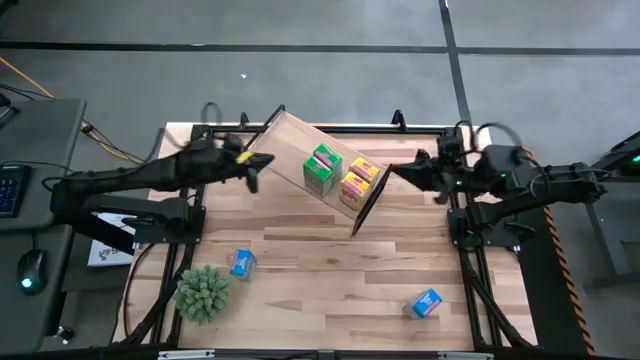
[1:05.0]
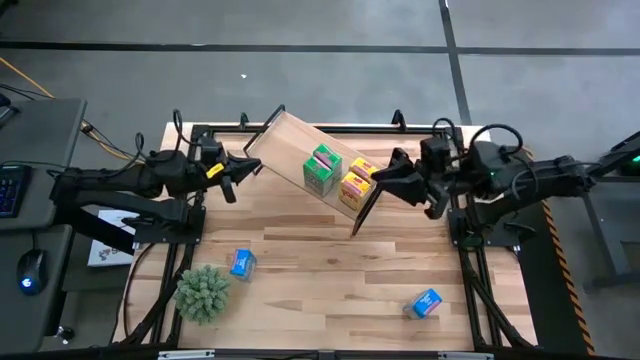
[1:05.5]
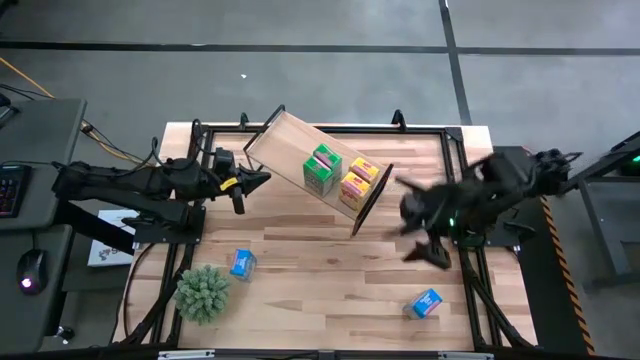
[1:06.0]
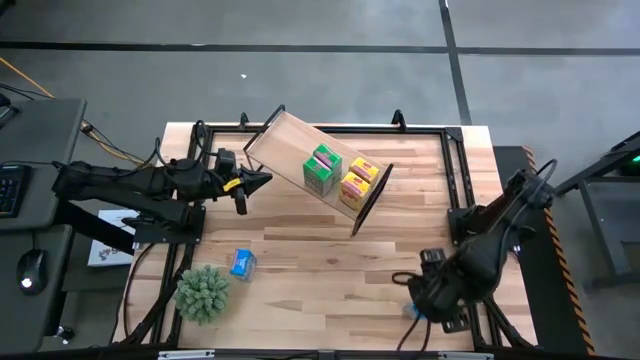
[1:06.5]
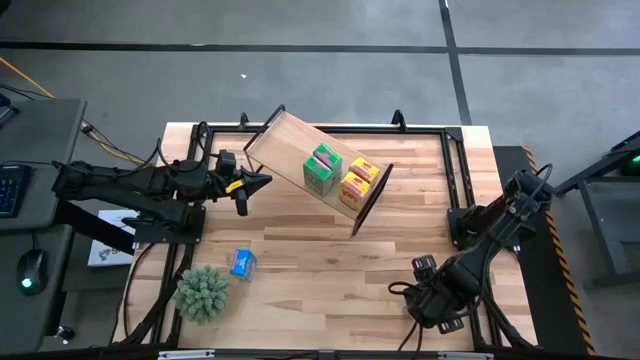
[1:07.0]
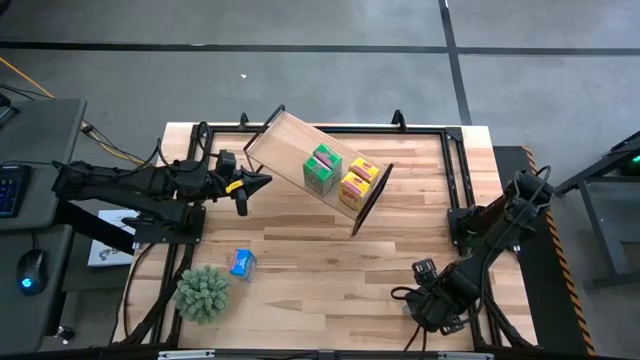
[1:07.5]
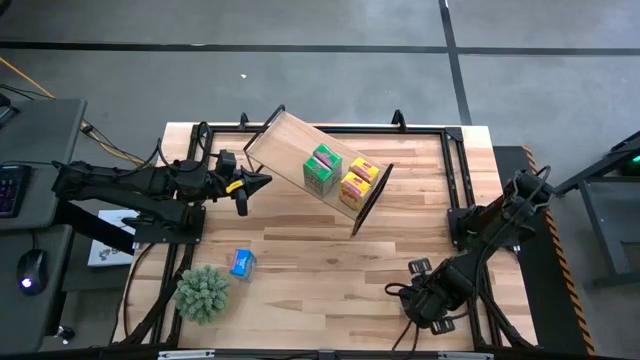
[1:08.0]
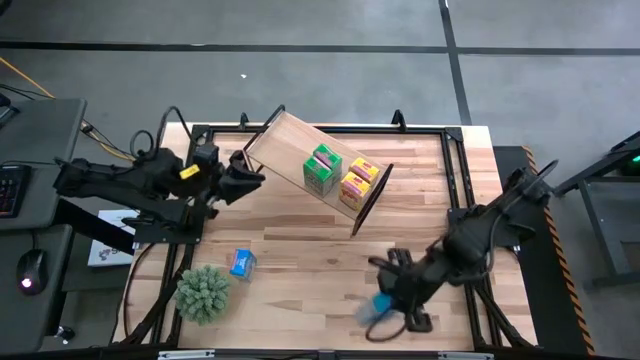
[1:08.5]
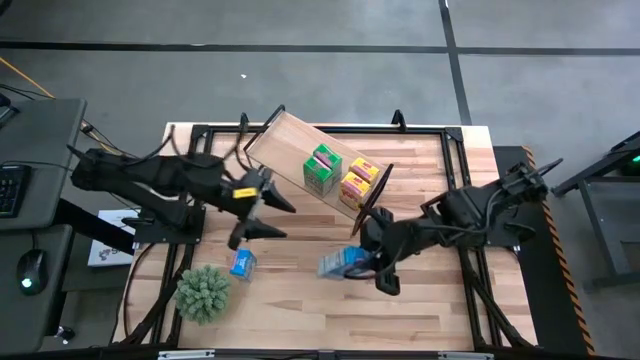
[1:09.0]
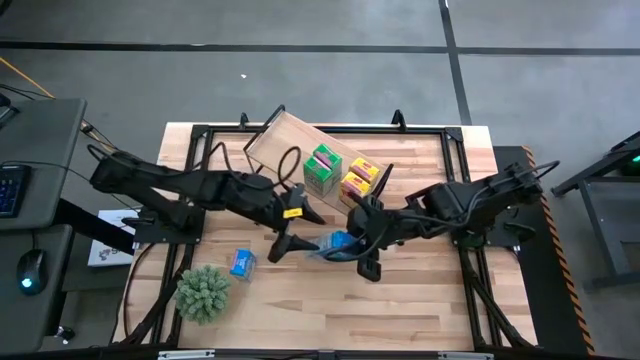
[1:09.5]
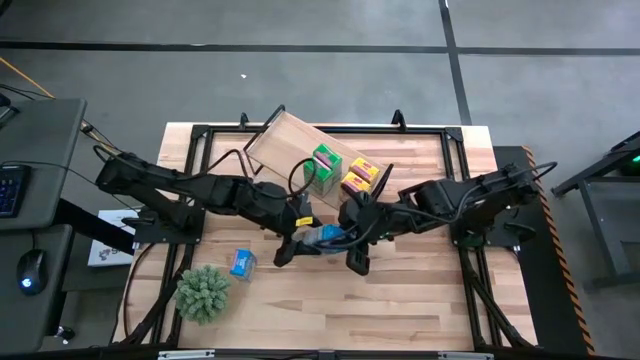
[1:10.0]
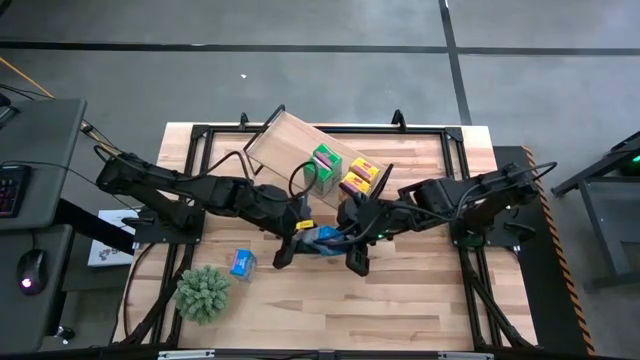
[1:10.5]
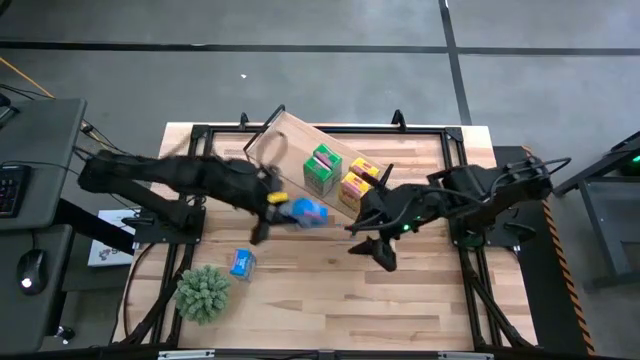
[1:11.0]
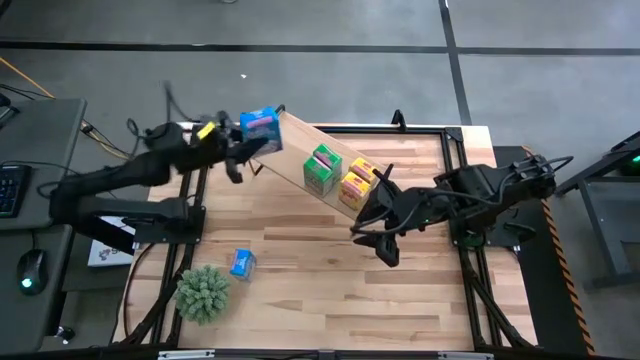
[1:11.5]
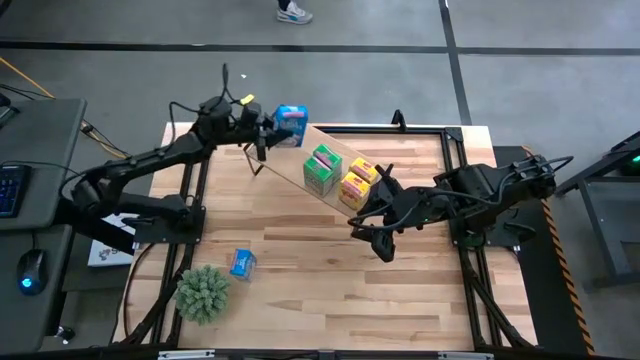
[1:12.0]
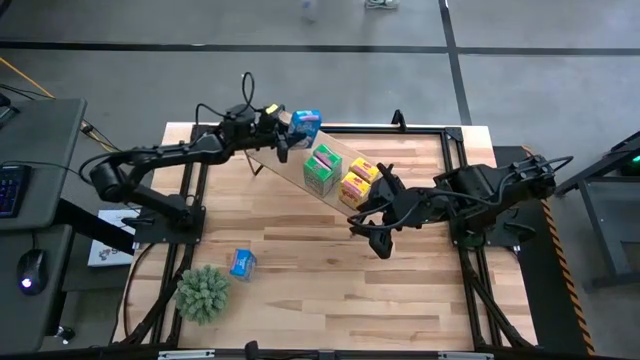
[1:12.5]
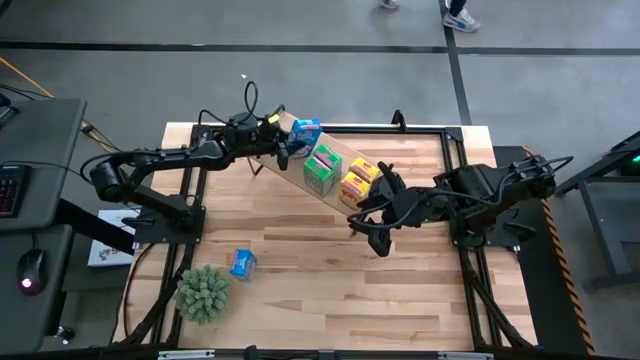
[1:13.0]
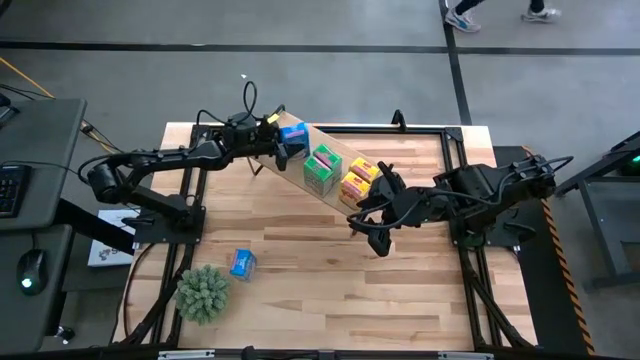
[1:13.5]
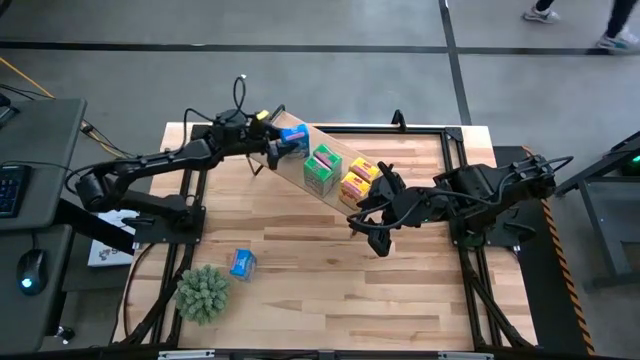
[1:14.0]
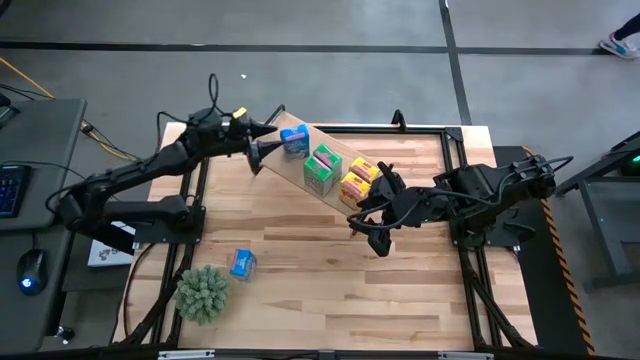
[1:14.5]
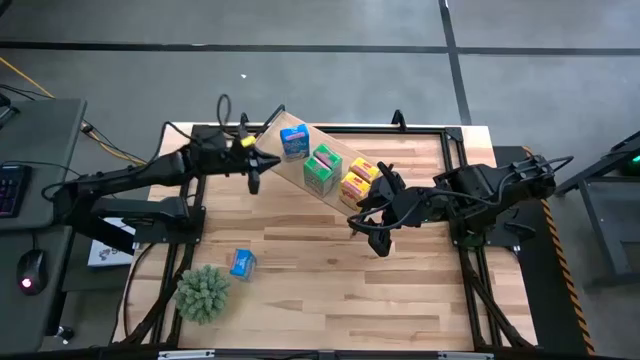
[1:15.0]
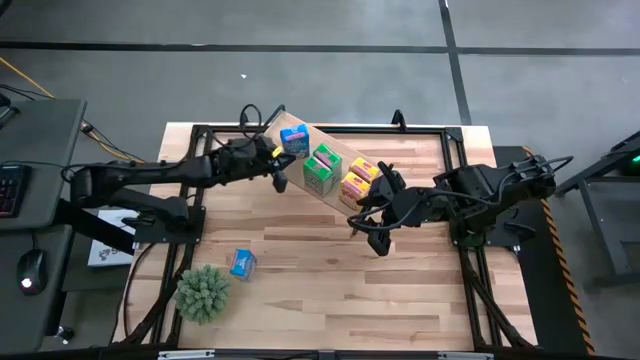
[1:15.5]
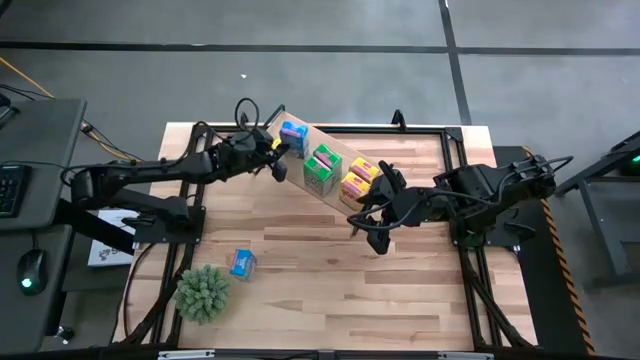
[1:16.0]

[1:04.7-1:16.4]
Task: Stack cereal on shelf
Put the right blue cereal box on the shelf

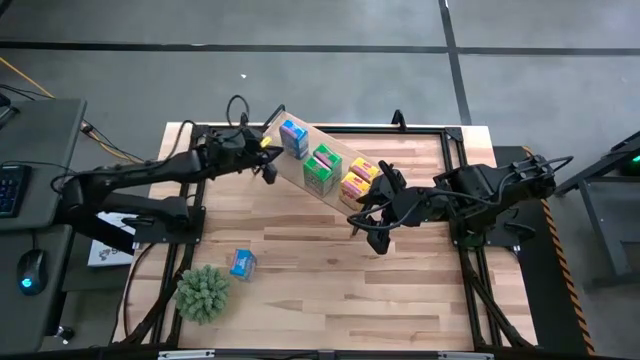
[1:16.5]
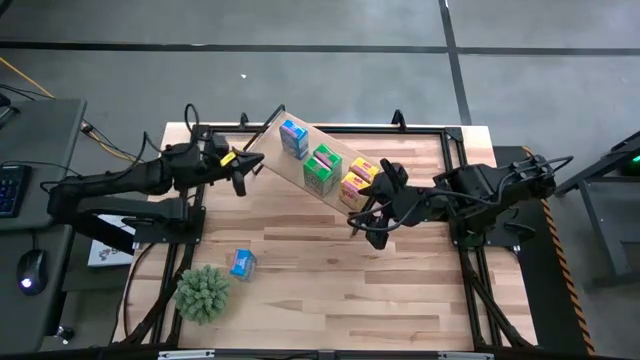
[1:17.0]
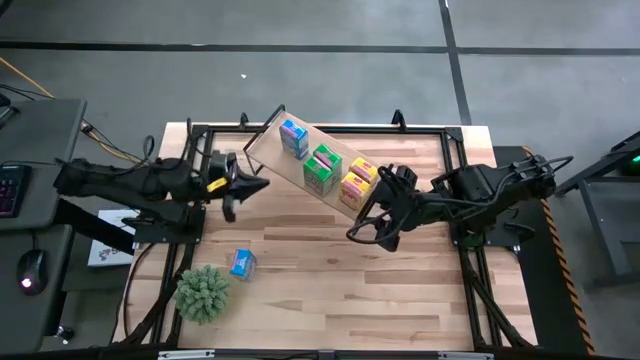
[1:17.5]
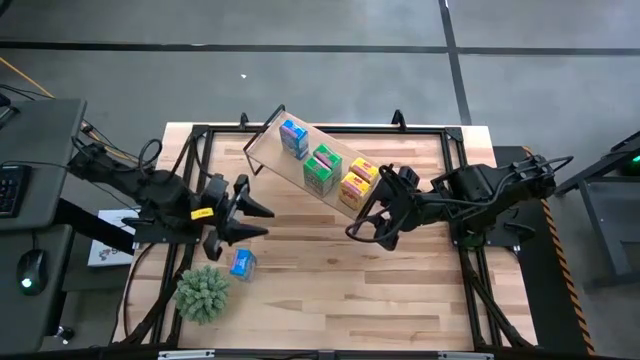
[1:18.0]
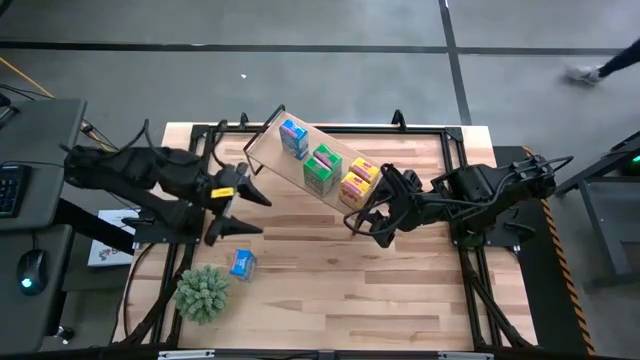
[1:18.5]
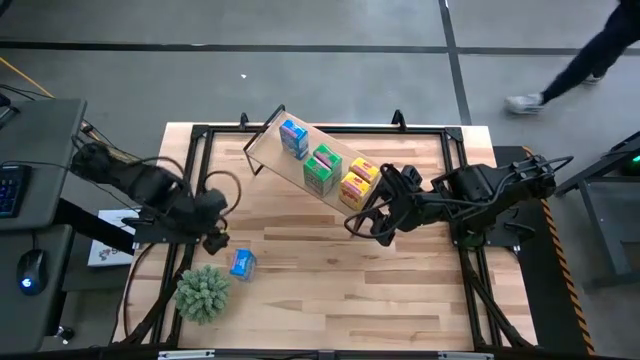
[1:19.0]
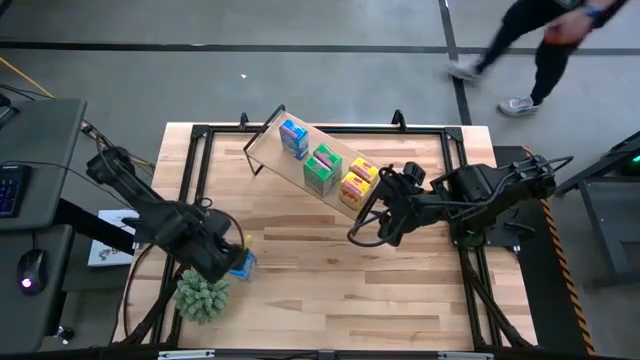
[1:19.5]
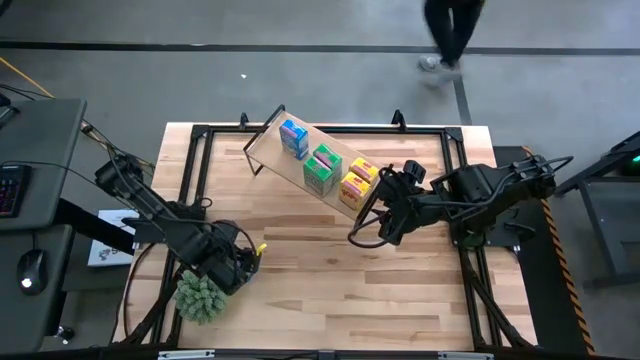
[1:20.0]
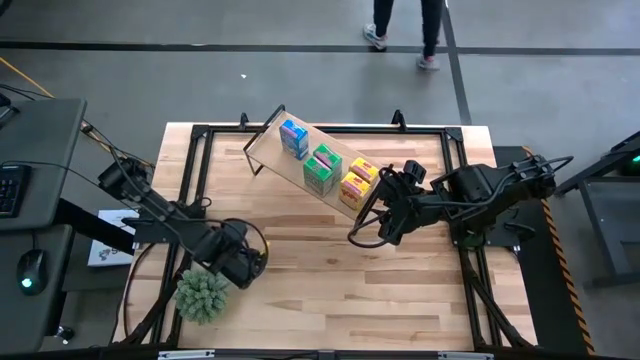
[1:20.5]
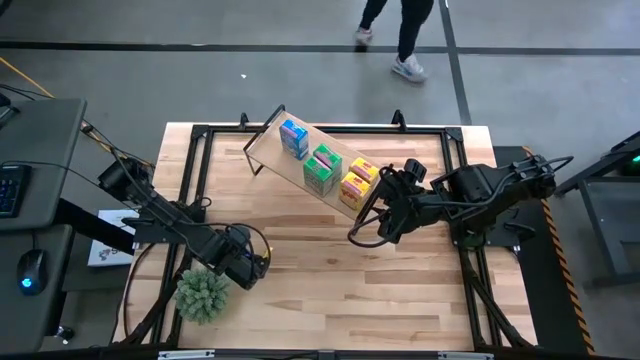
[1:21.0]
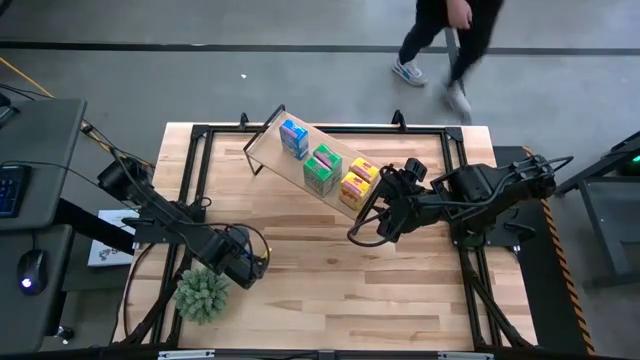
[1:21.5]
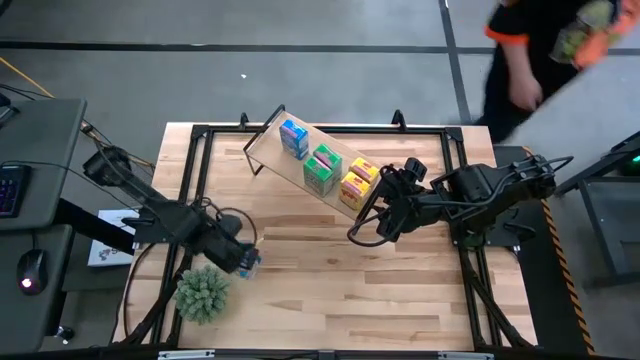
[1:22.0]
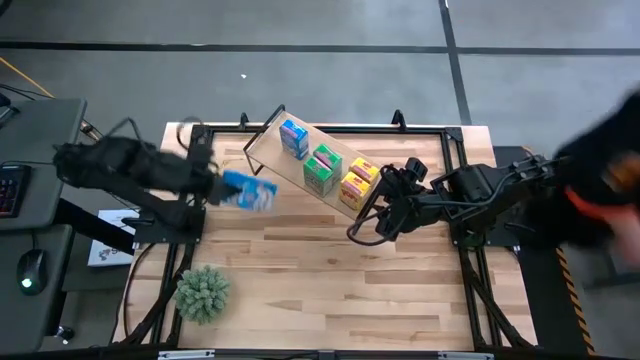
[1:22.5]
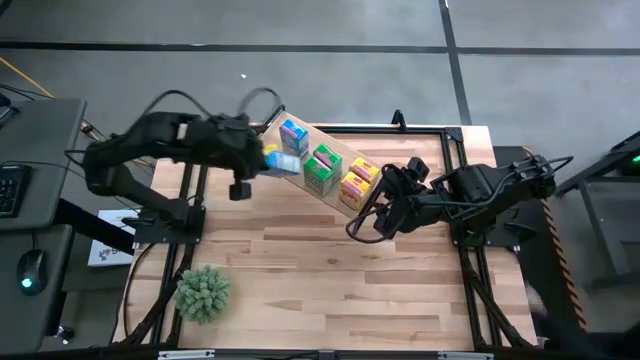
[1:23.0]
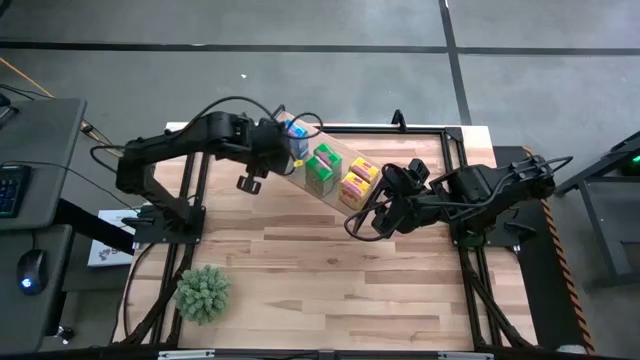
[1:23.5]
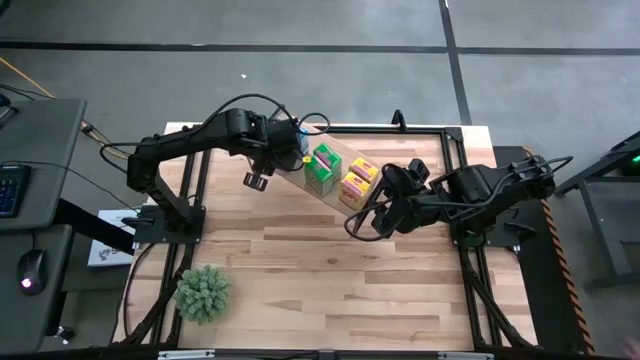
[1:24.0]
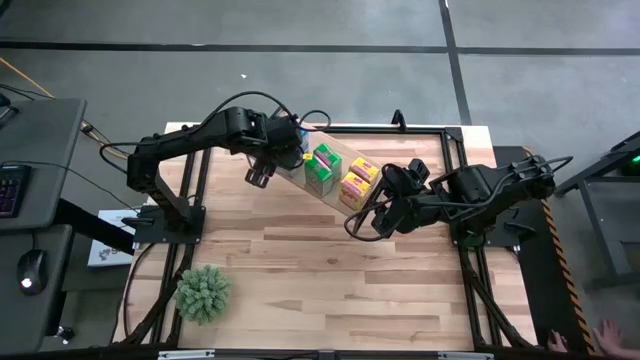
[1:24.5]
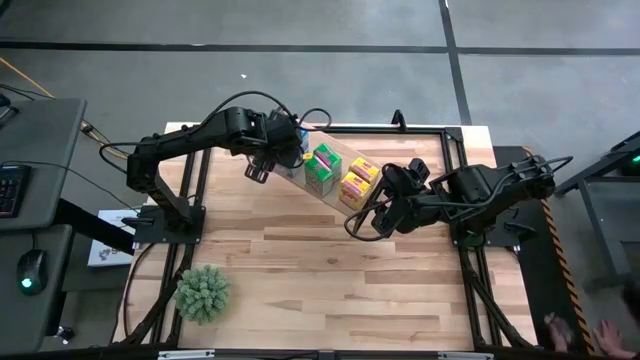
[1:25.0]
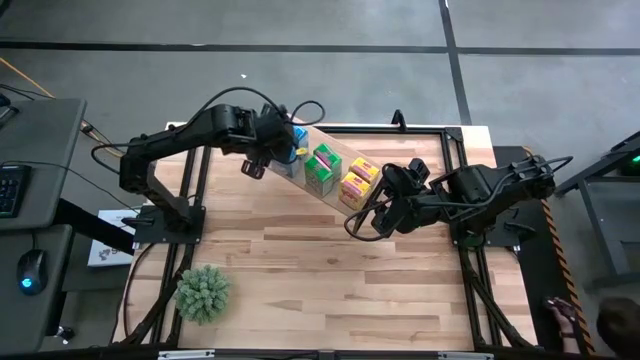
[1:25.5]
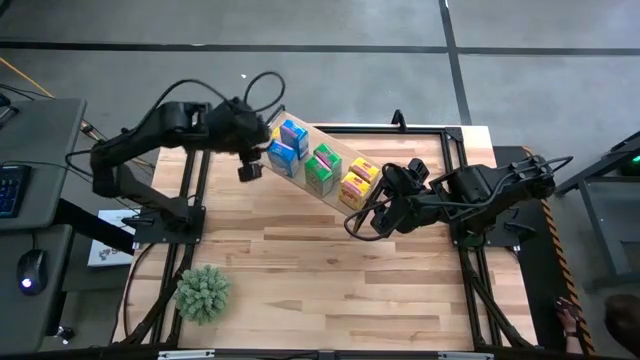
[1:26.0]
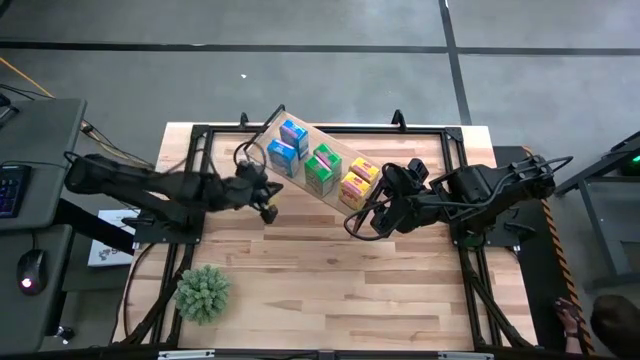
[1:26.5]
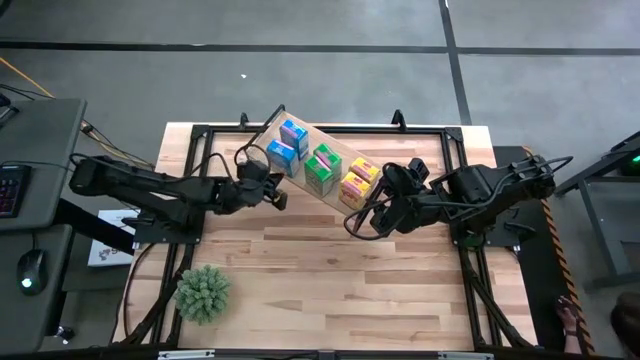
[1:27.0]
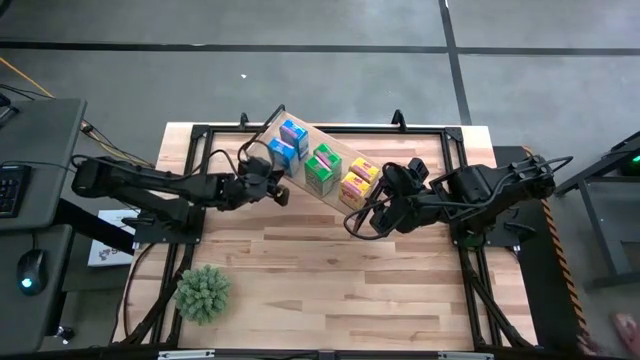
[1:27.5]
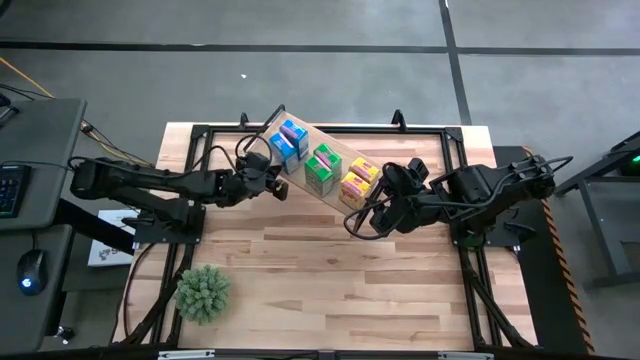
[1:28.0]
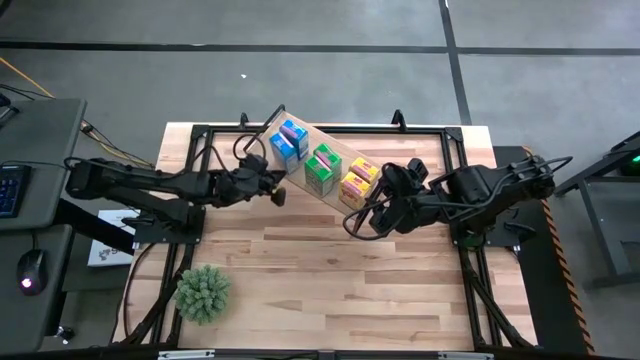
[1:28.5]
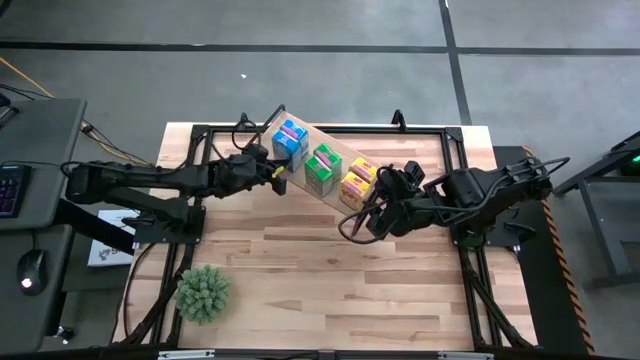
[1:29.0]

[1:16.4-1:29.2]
Put the blue cereal box on the shelf aligned with the other blue cereal box
